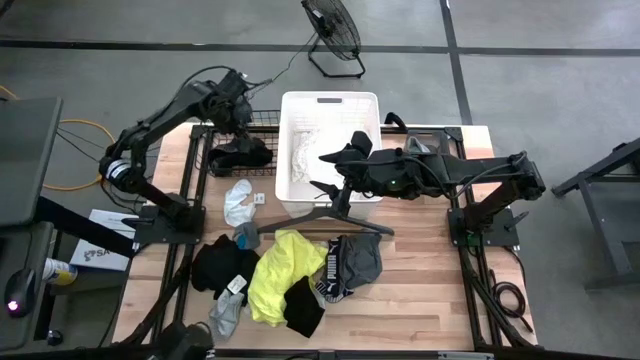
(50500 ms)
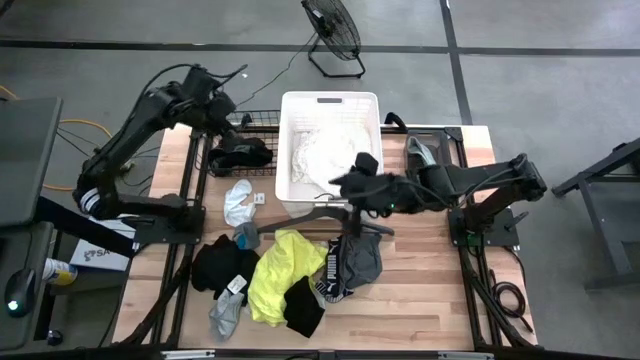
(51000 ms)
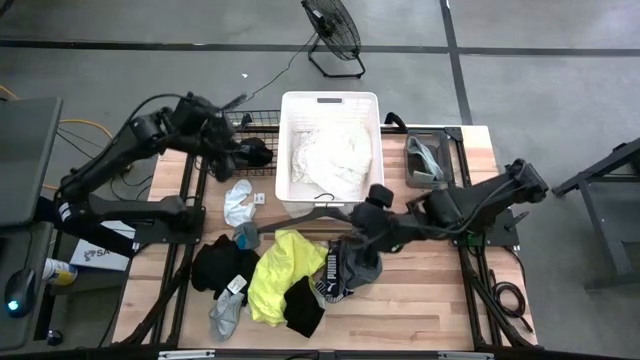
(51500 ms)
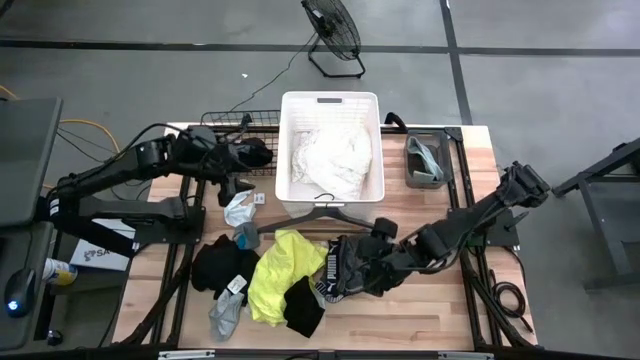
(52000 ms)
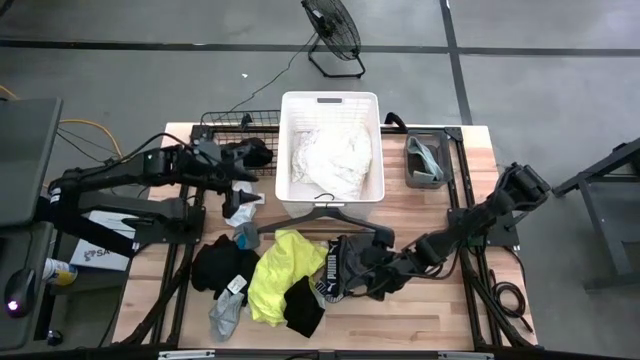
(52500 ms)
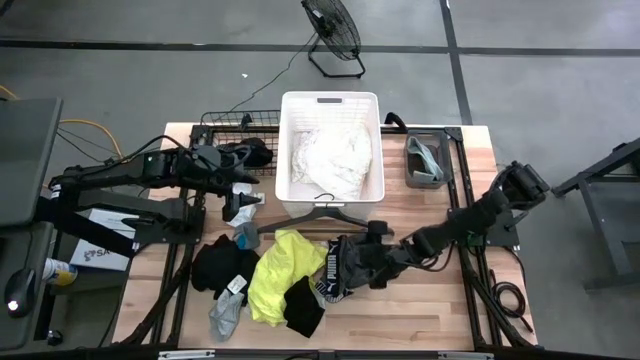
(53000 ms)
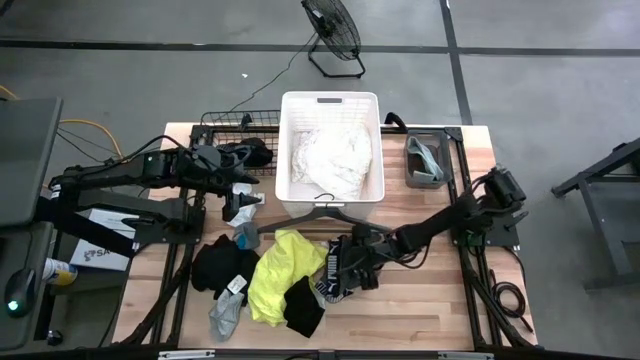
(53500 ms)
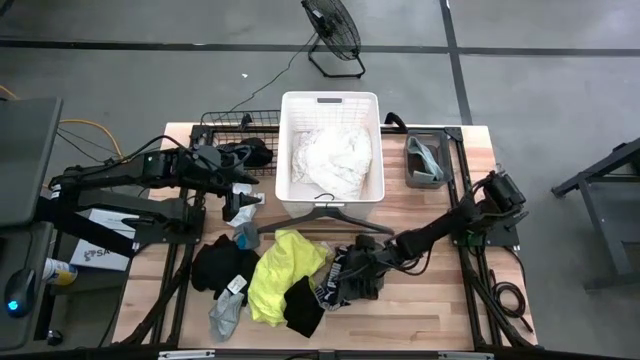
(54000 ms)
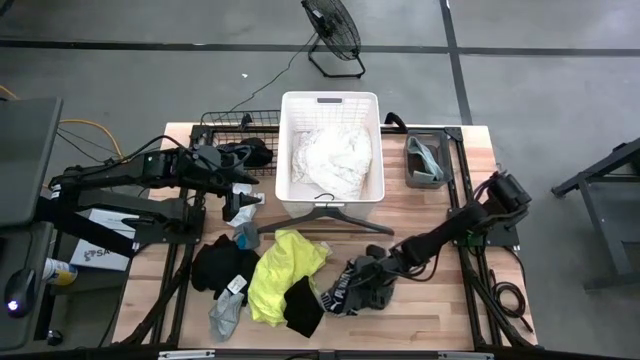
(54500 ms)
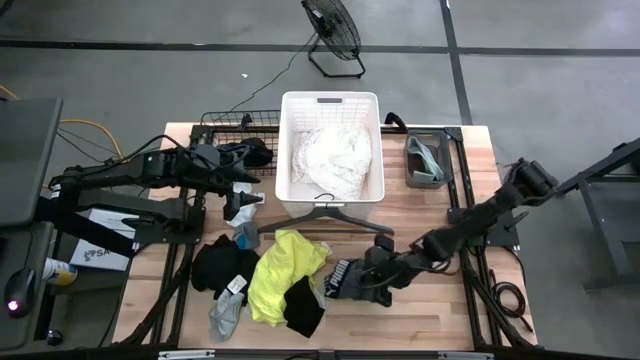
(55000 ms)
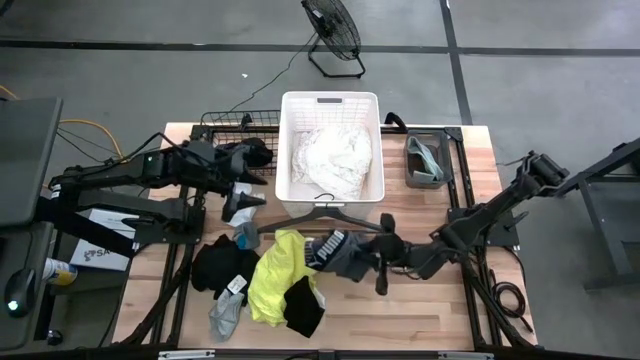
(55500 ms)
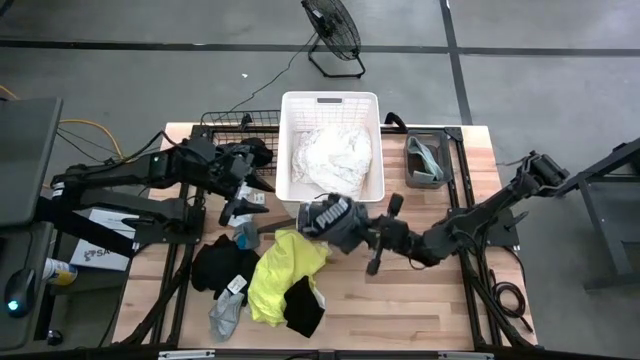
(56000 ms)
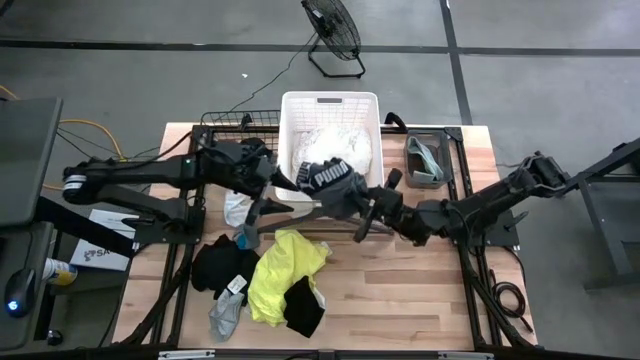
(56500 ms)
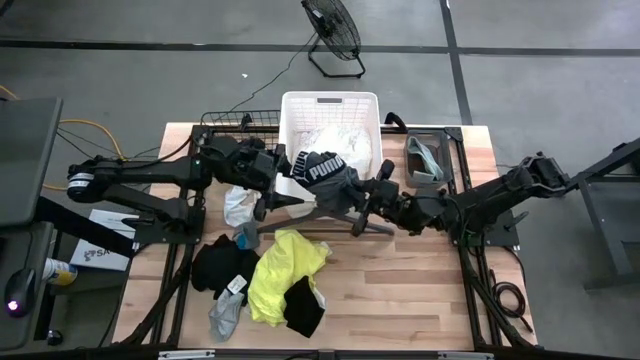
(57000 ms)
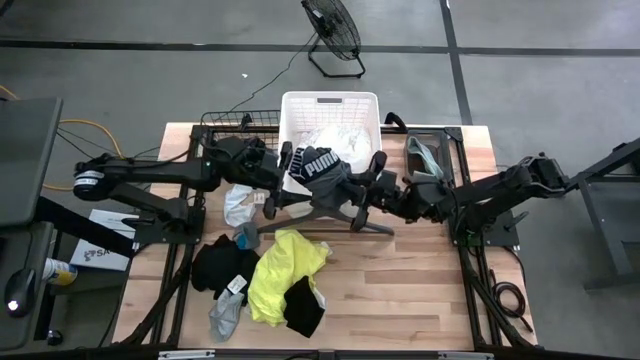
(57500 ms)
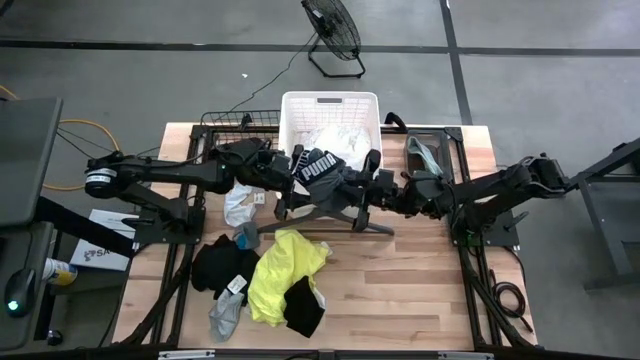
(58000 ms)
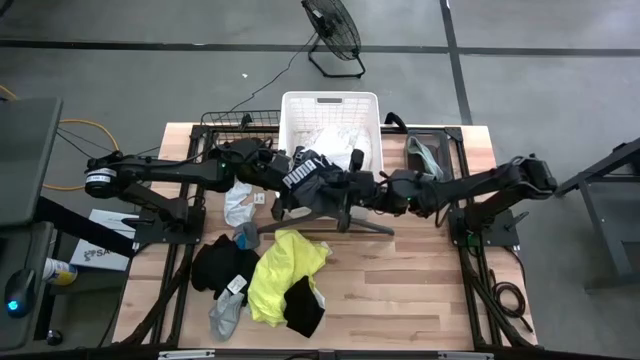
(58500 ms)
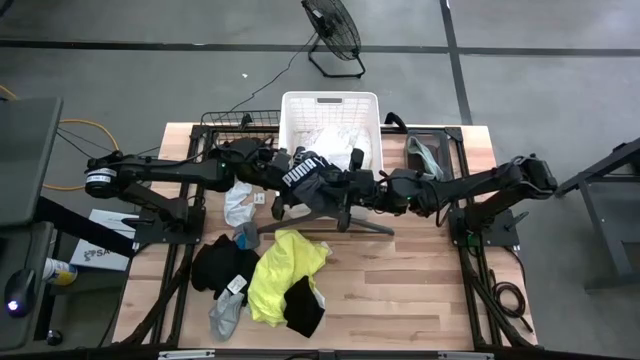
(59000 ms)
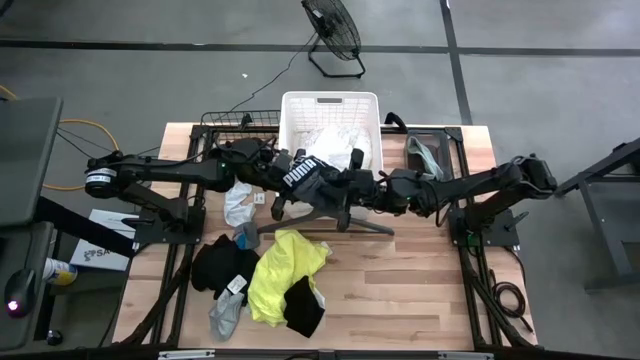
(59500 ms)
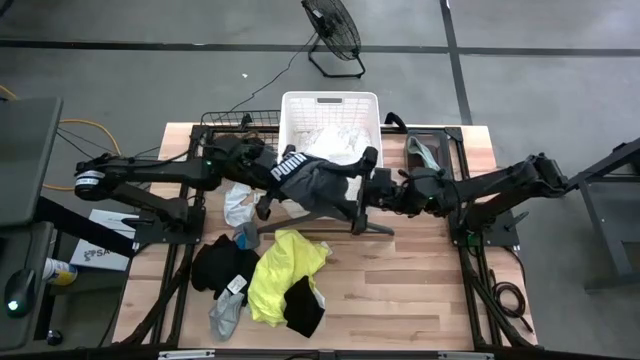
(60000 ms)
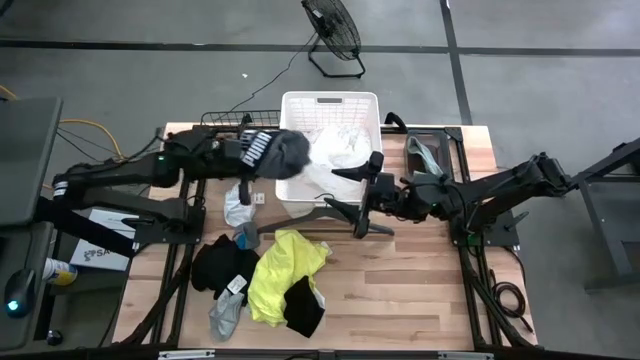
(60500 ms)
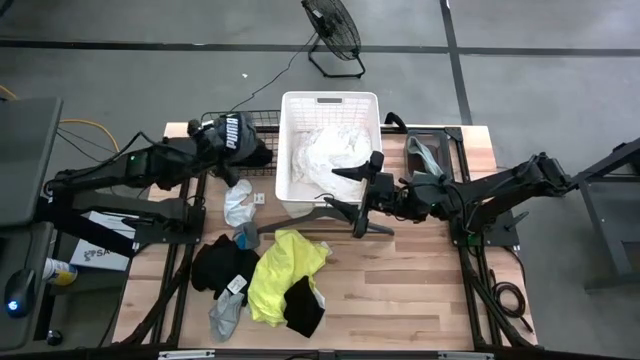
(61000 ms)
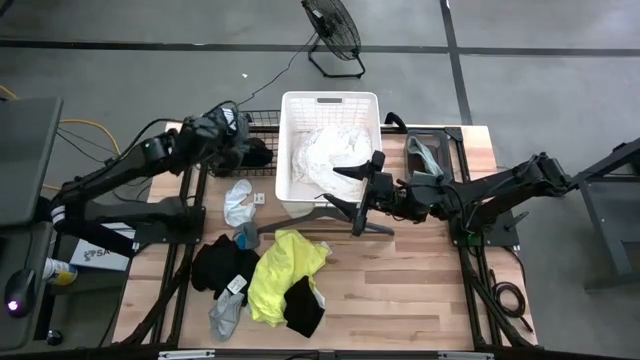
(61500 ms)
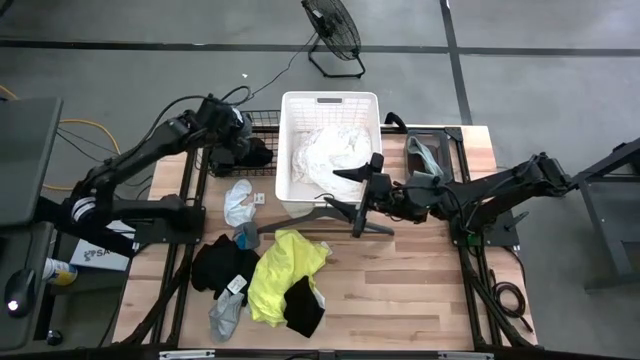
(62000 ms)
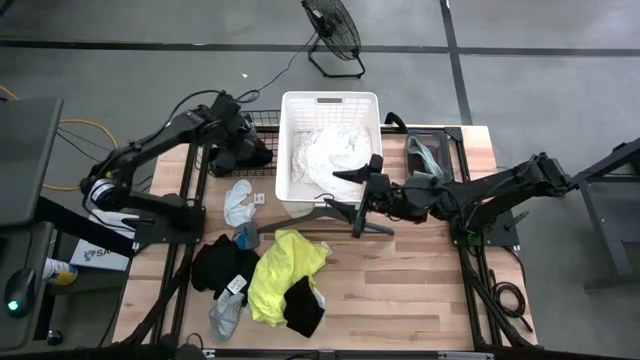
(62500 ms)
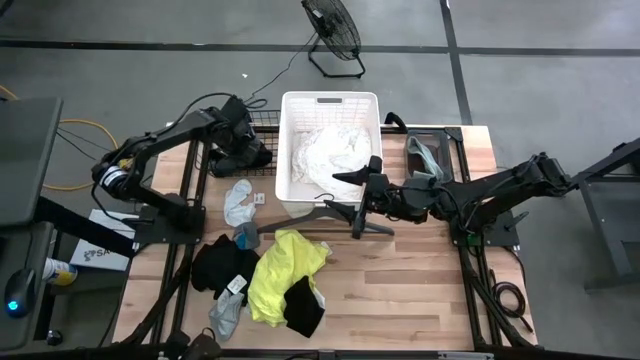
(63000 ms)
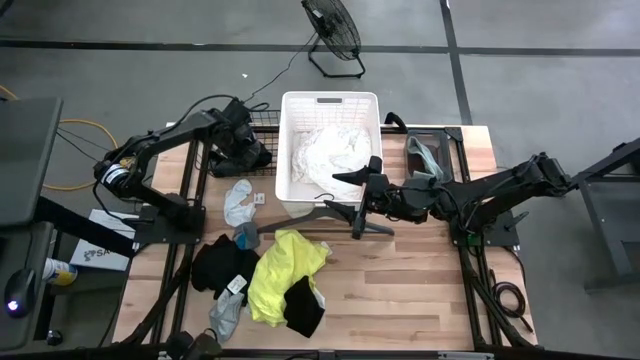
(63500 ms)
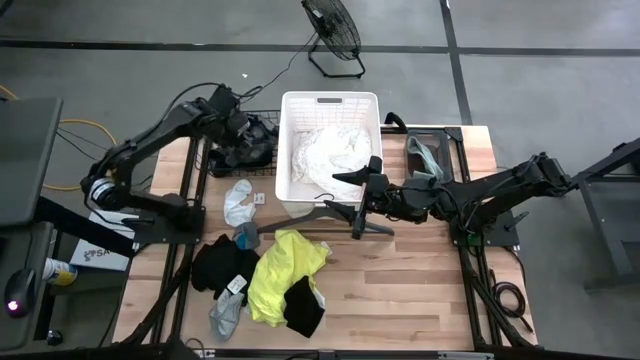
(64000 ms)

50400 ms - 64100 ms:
Task: Pick & Place Cloths
Put the grey underwear into the wire basket

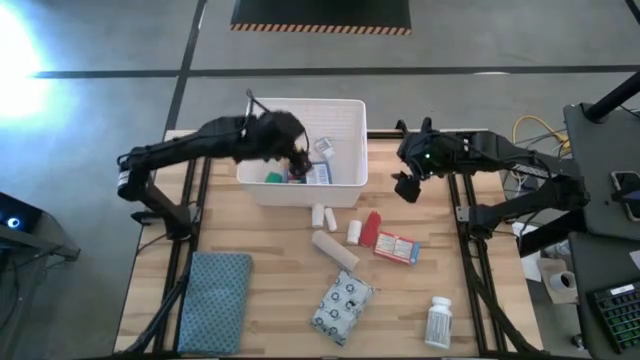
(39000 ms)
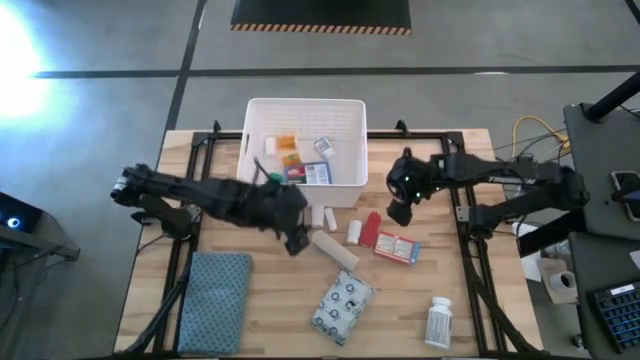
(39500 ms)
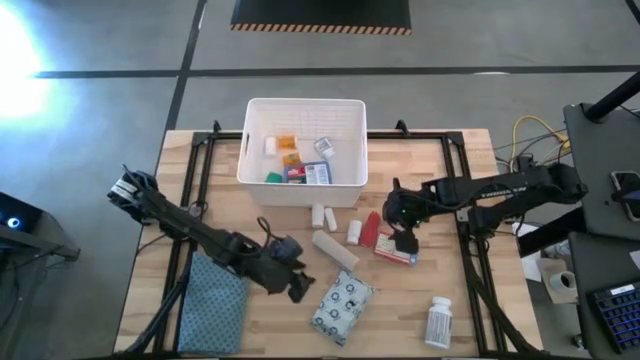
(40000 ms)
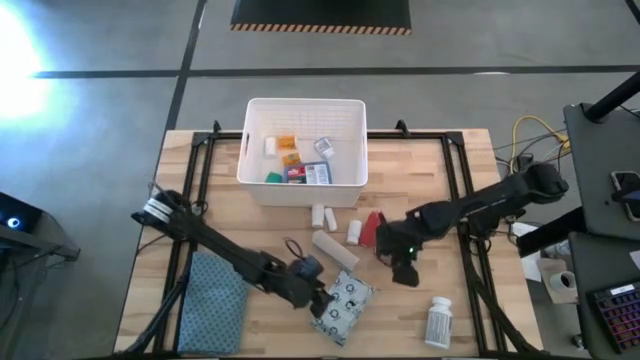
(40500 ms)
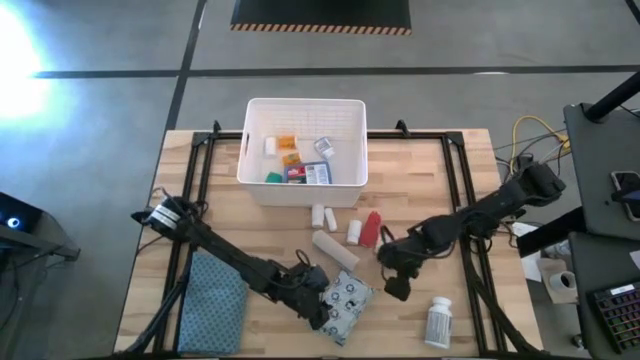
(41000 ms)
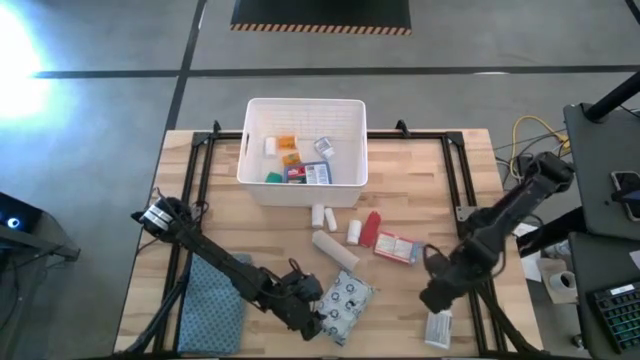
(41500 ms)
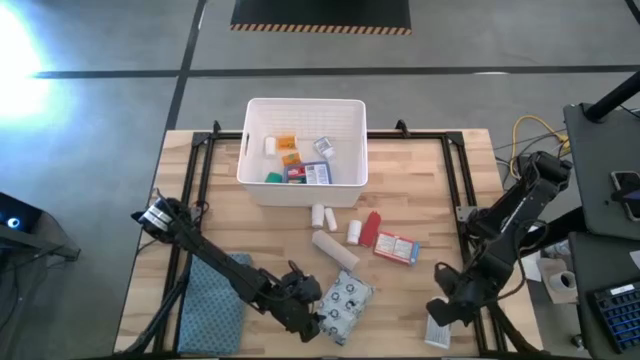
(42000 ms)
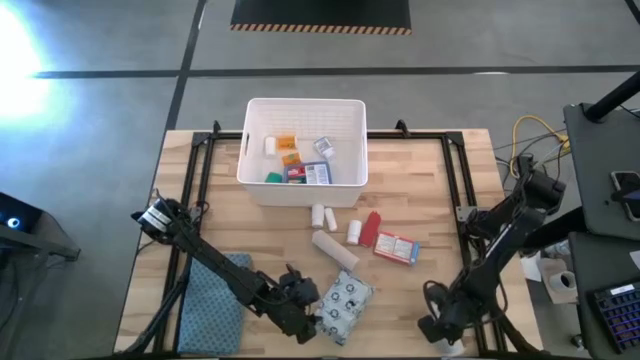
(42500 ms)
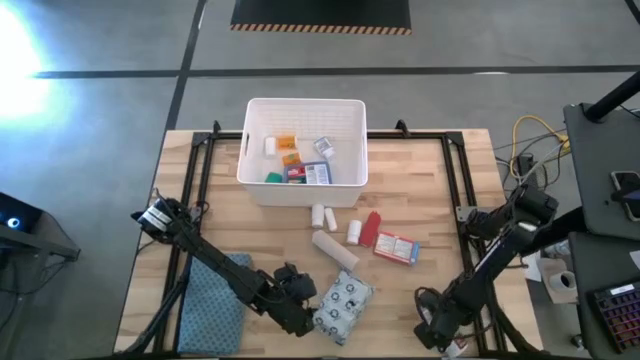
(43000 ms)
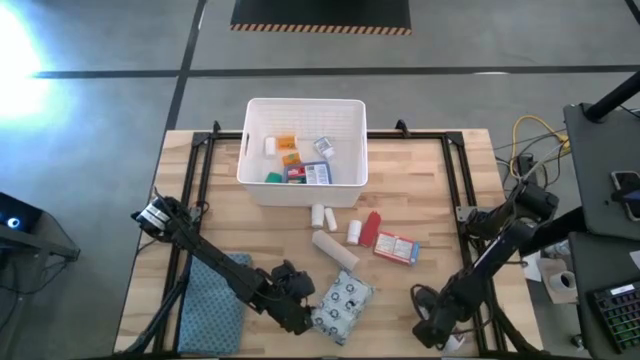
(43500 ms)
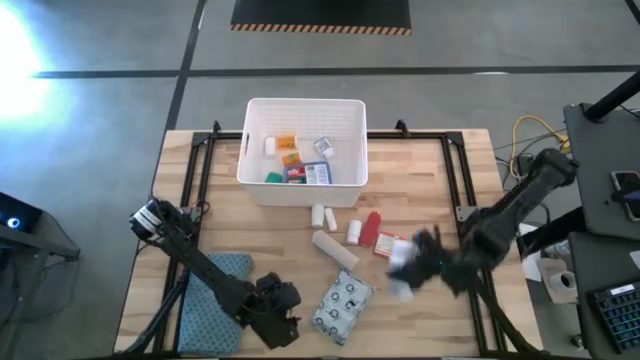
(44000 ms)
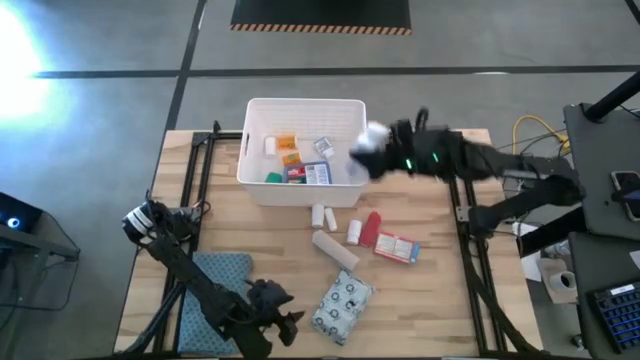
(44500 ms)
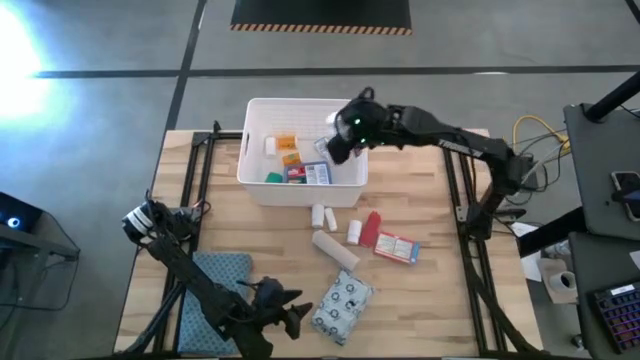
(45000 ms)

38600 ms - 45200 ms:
Task: Pick & place medical supplies in basket/bin
Put the white purple pill bottle into the white bin
